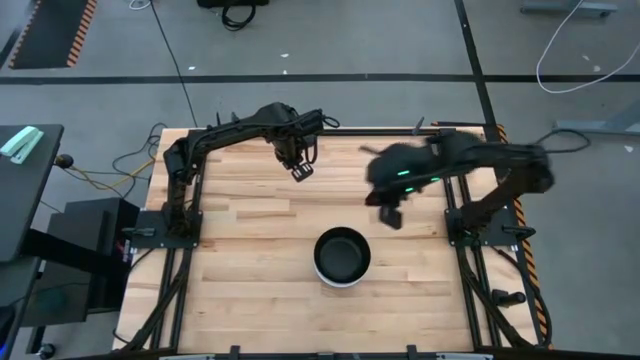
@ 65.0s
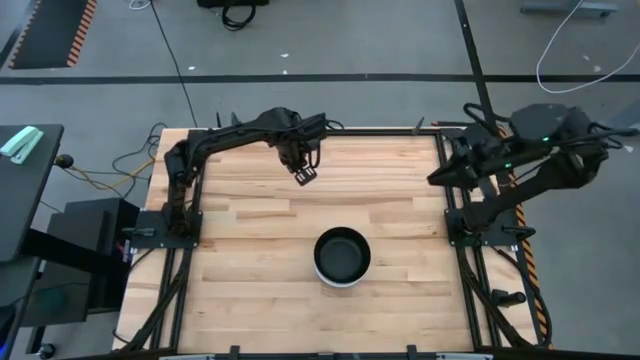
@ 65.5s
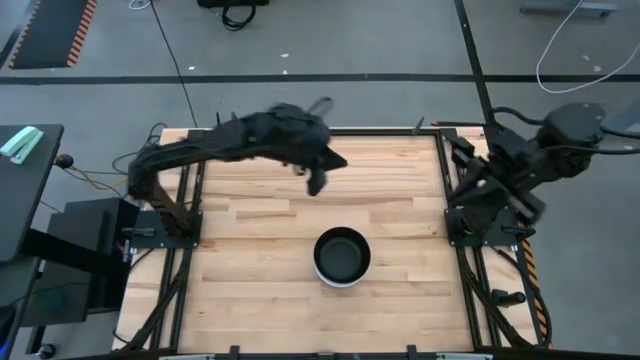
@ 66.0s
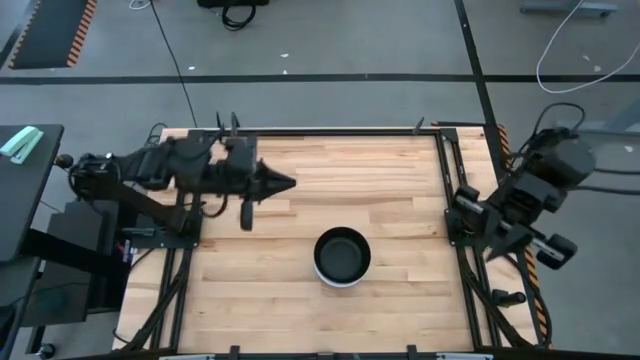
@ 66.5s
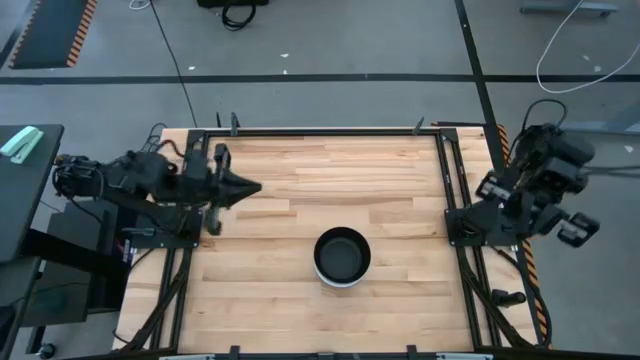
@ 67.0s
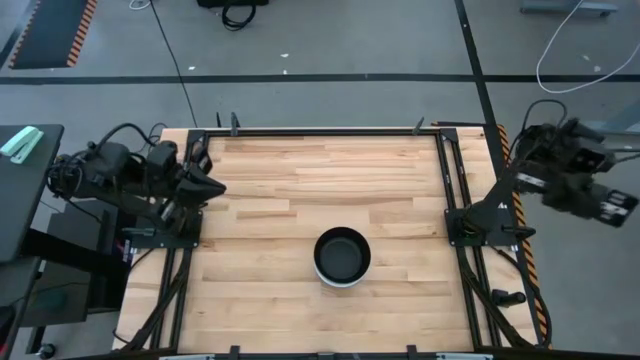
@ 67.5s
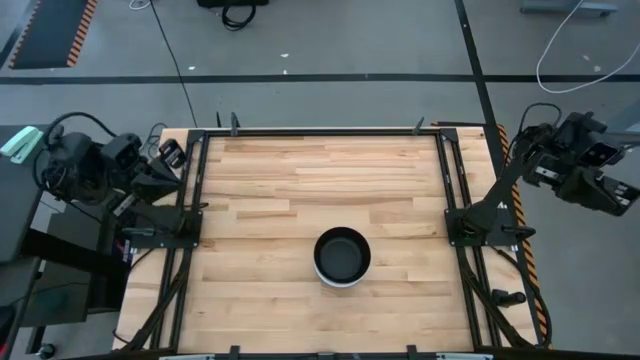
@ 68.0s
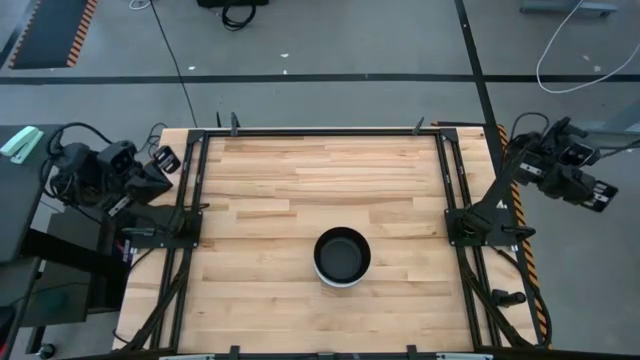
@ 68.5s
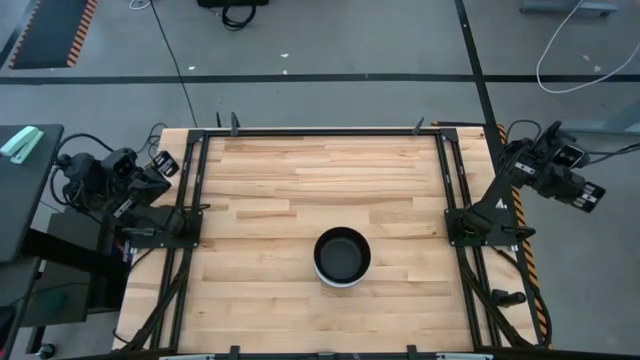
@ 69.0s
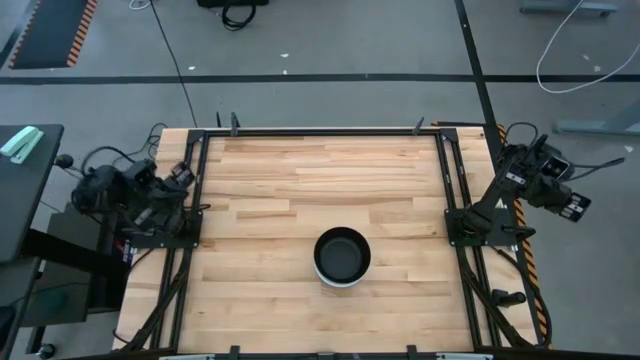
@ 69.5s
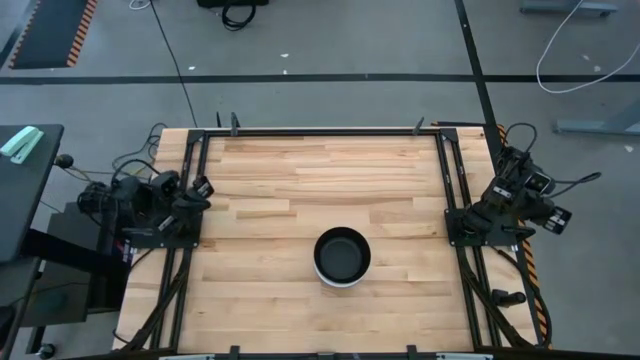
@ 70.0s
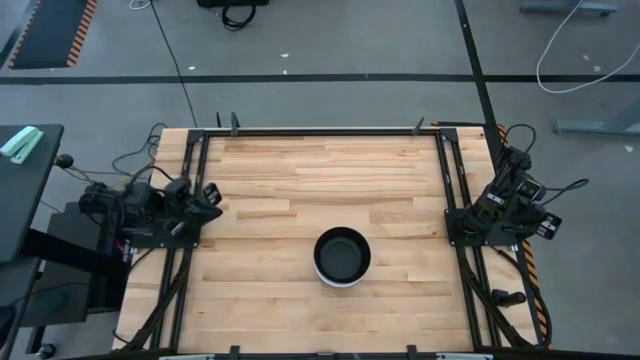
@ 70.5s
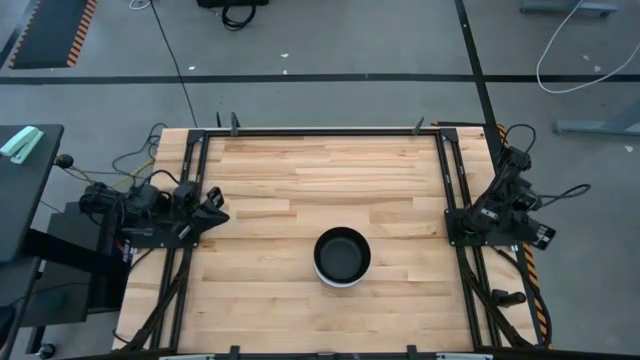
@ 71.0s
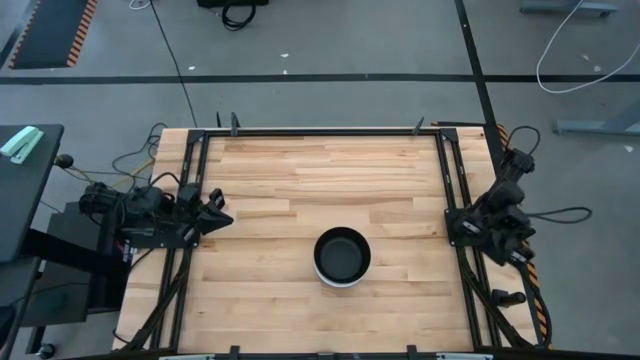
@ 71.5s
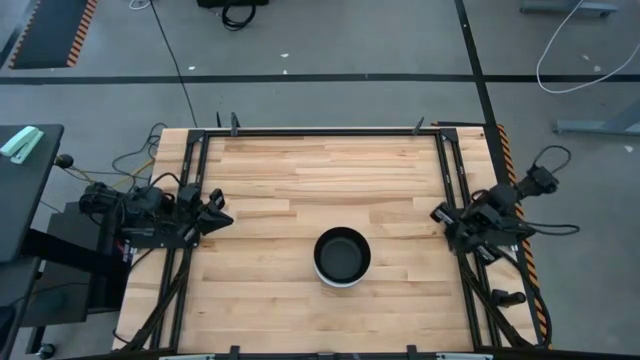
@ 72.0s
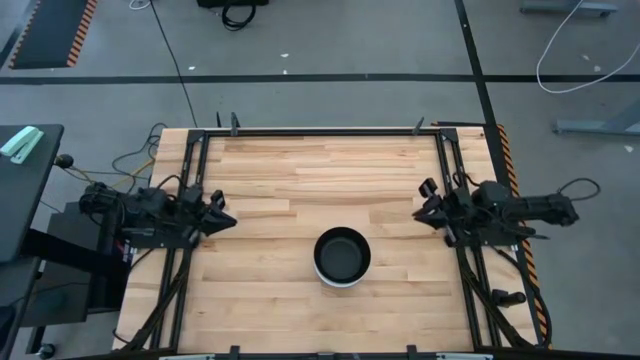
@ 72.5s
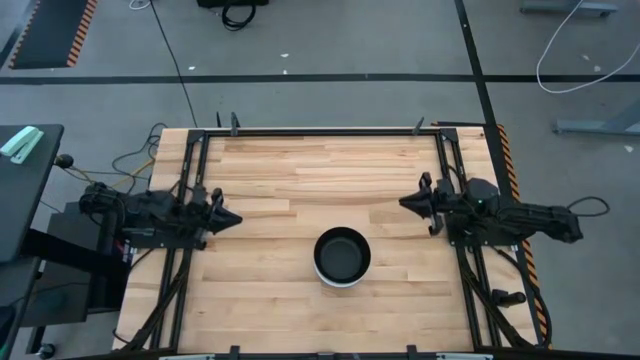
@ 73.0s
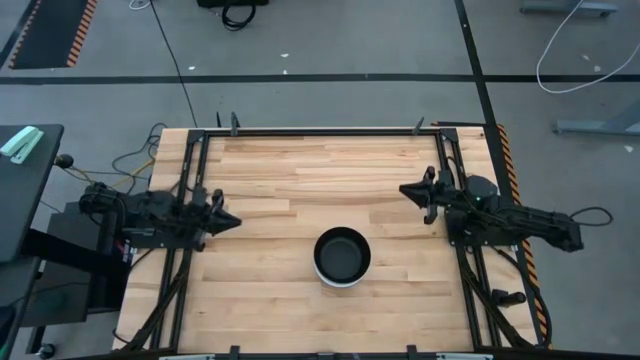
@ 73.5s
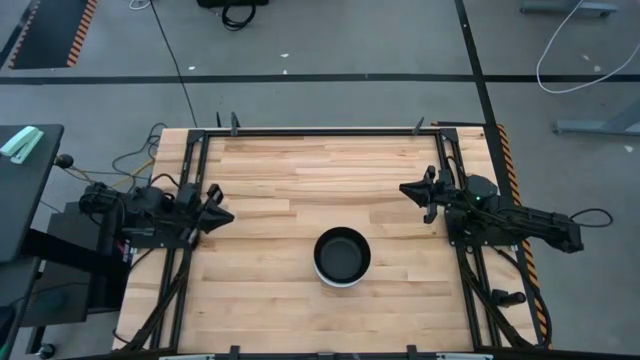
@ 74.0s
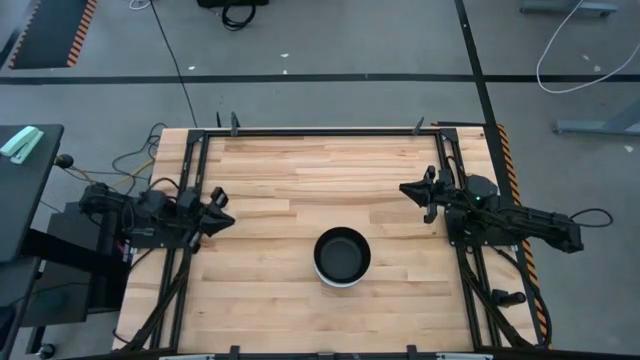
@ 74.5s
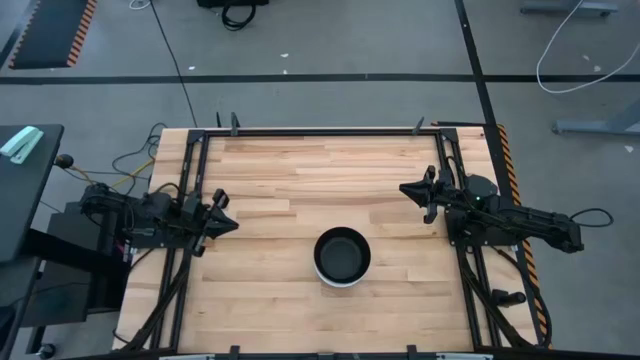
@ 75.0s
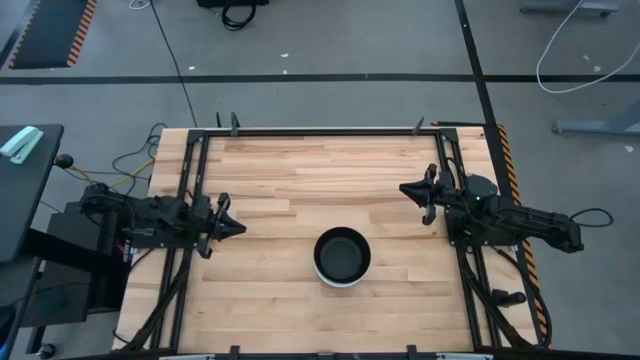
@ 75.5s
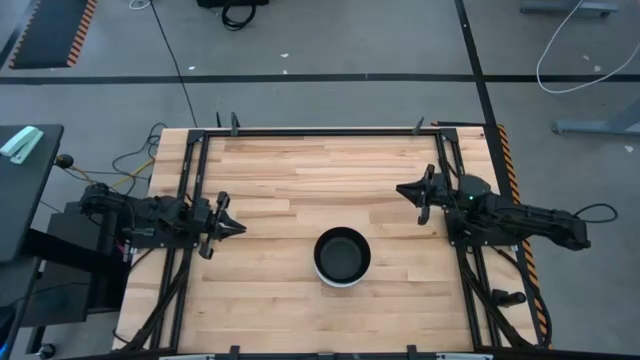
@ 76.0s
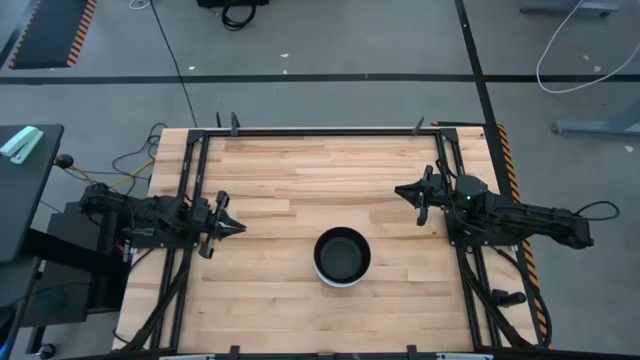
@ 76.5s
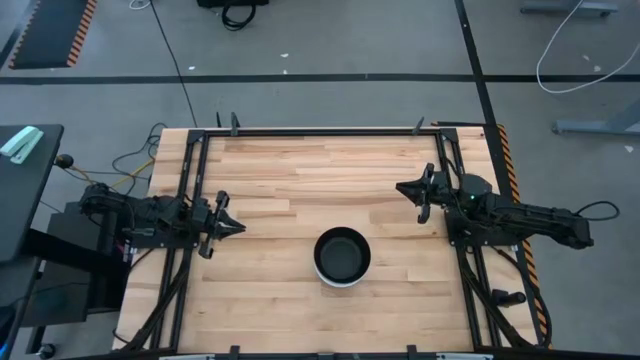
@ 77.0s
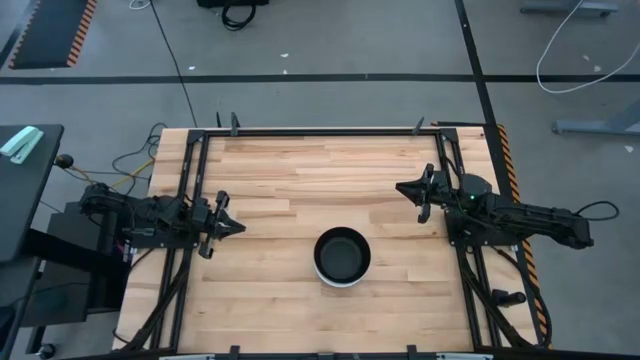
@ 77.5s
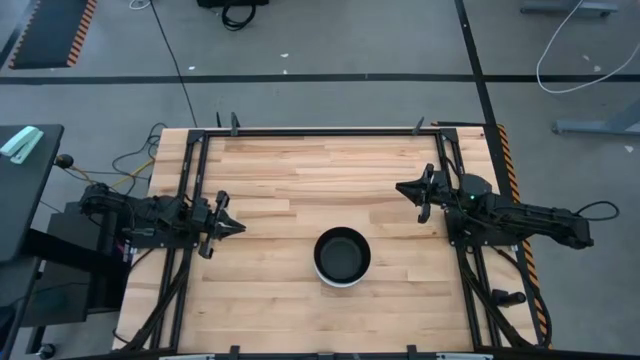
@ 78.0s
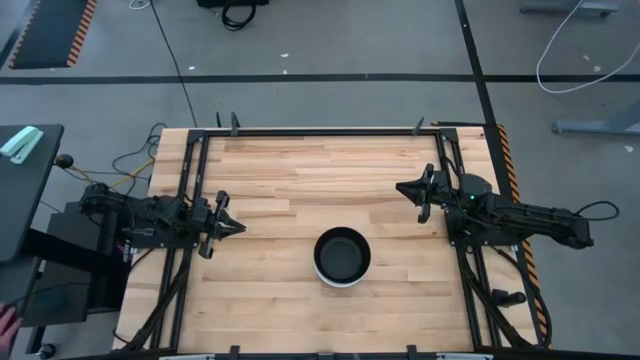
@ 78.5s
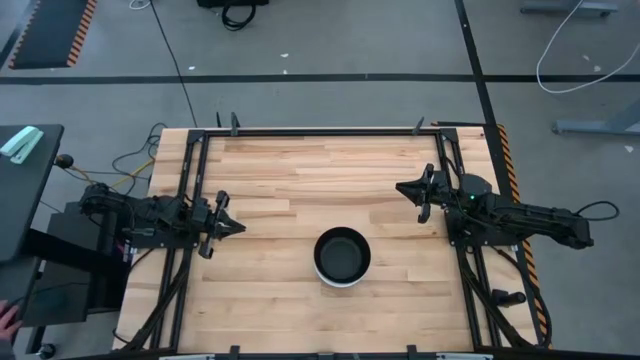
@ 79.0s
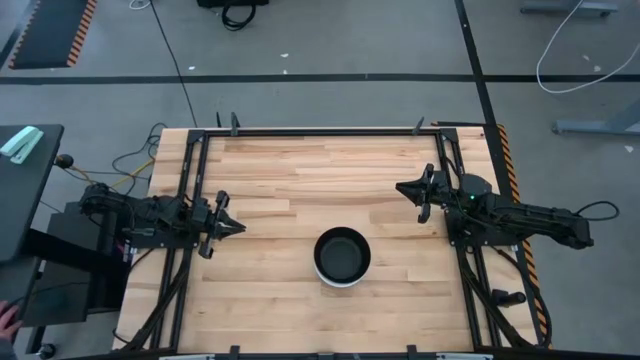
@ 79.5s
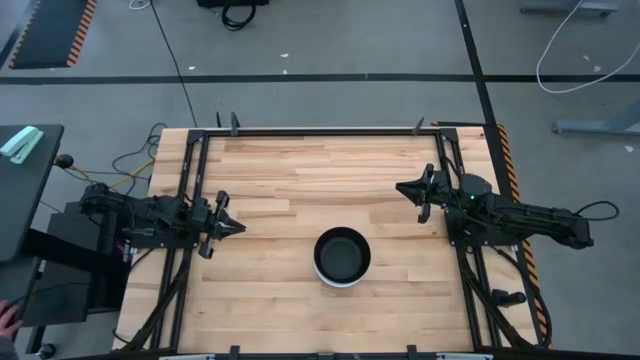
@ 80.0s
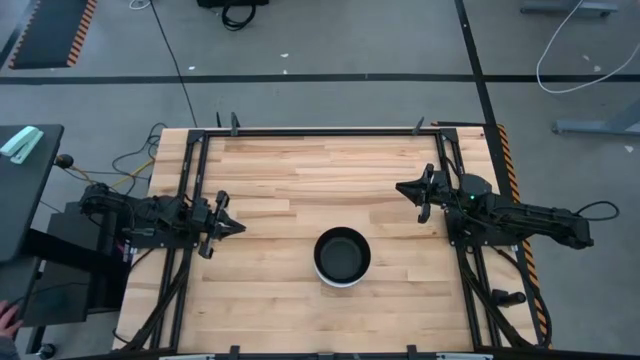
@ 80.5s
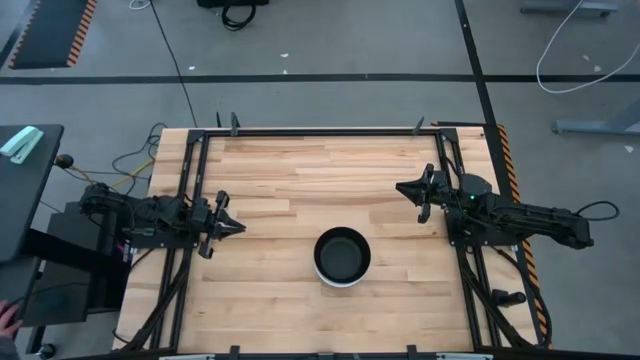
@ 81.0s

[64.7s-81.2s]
Task: Nest bowls inside each other
Return to Home Position

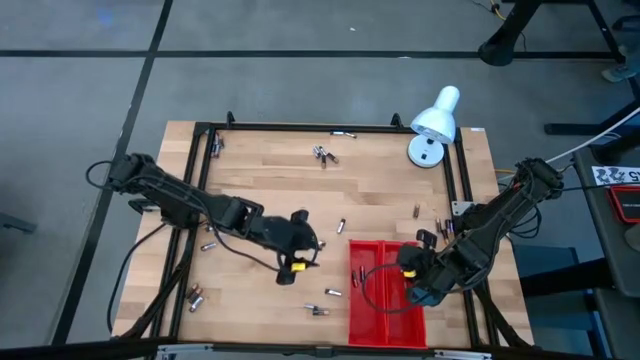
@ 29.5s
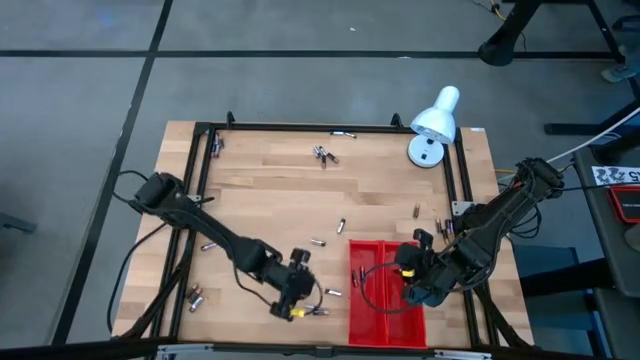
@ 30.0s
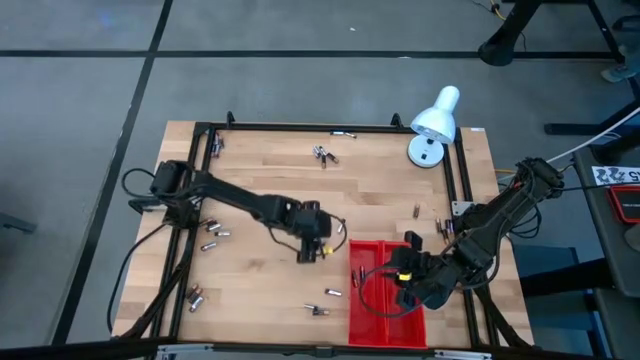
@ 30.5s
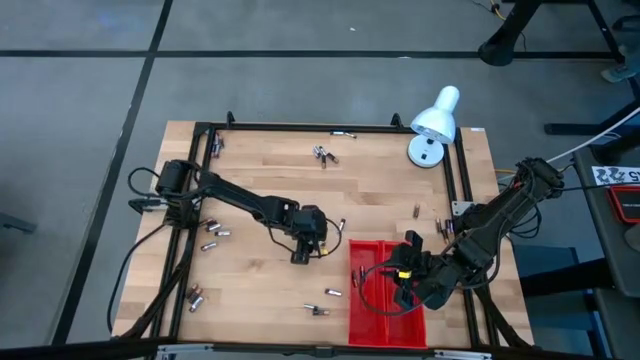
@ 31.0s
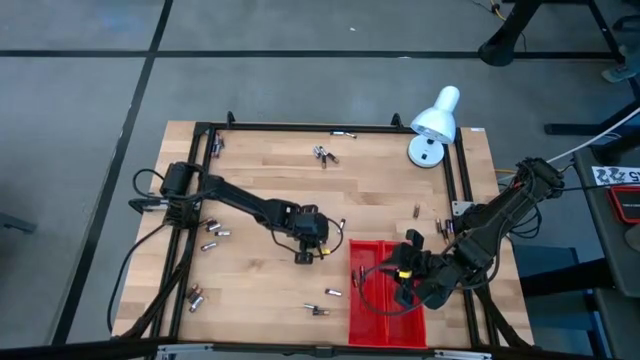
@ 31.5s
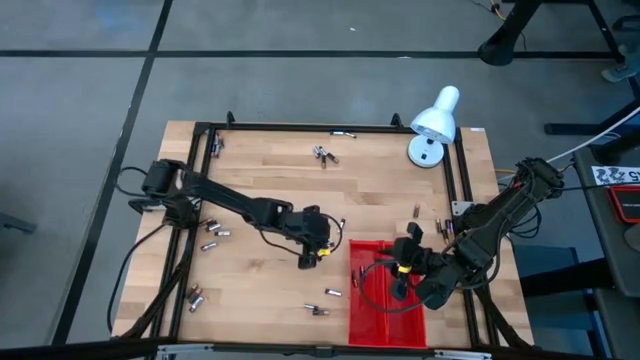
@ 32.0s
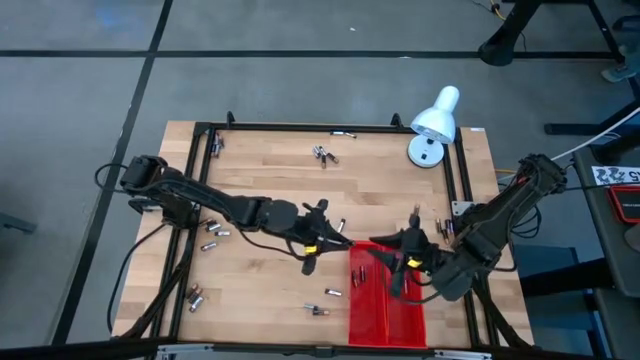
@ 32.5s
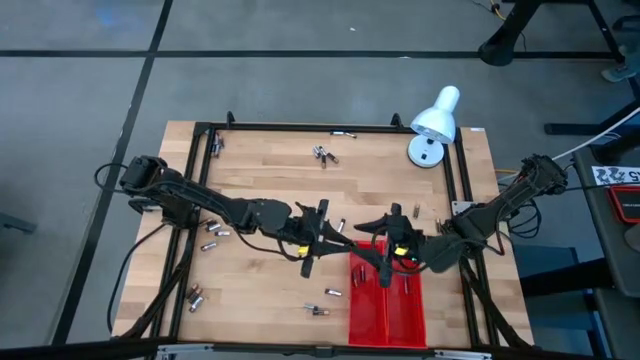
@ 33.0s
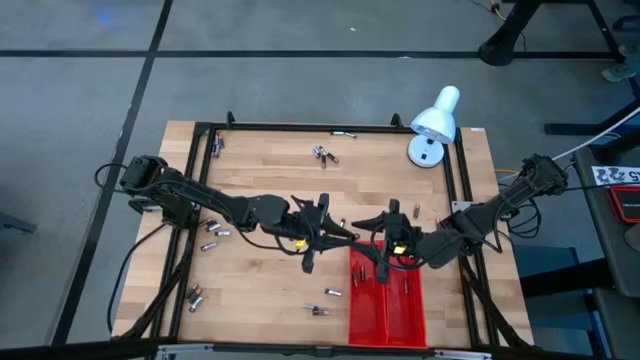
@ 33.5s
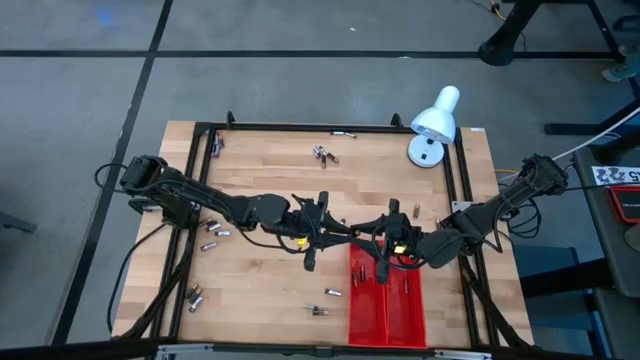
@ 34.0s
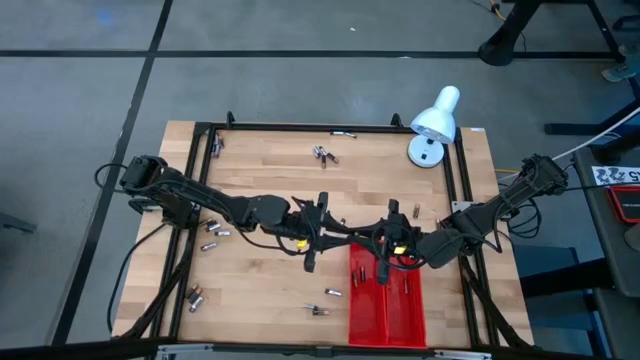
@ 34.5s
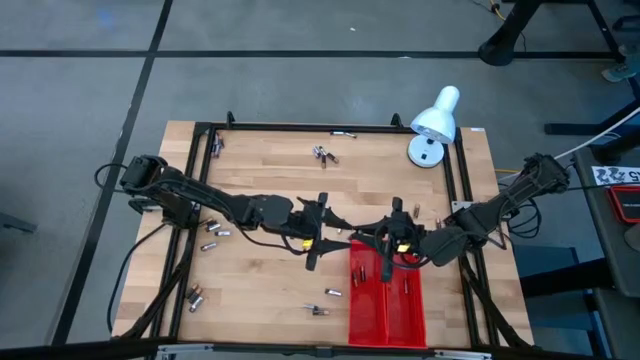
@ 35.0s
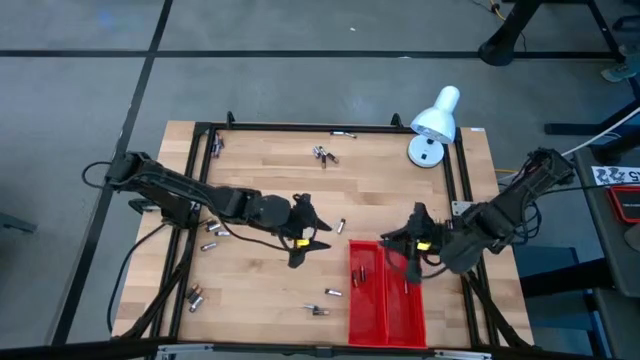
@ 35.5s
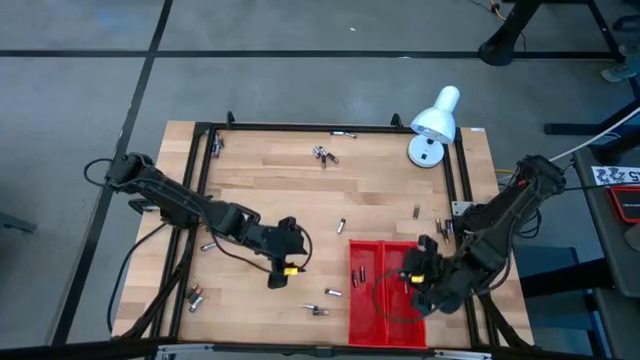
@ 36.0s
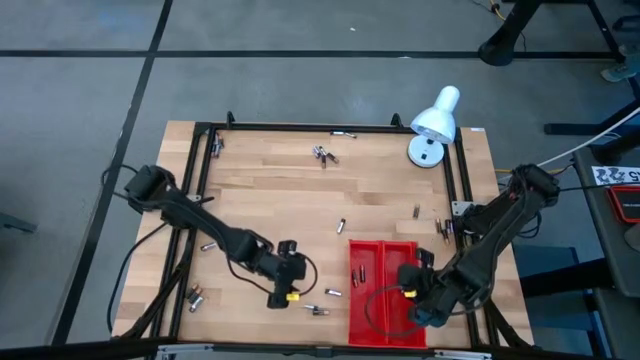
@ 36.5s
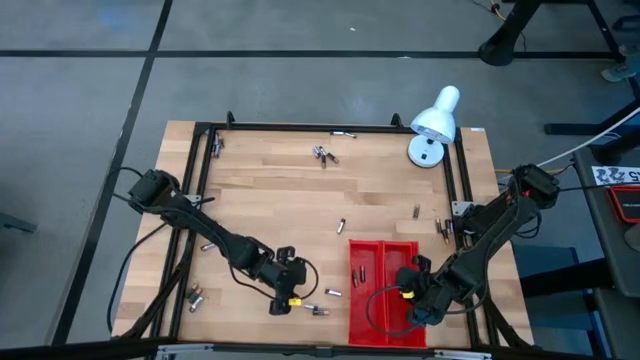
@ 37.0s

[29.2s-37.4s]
Task: Sort batteries
Put the silver battery into the right red bin
